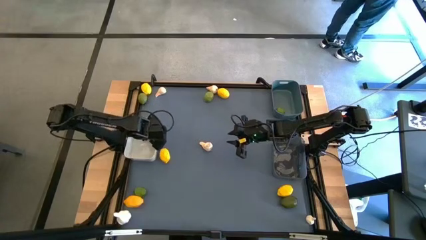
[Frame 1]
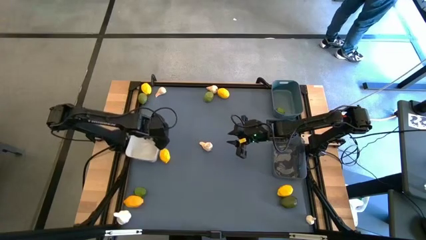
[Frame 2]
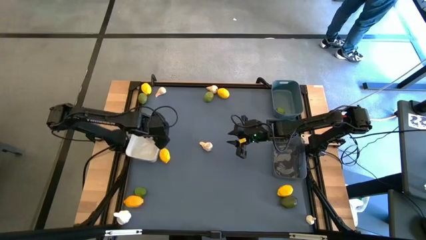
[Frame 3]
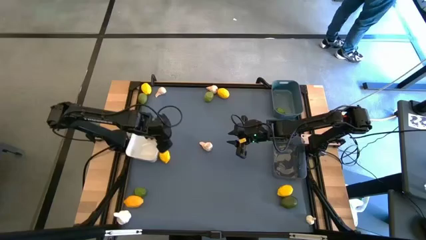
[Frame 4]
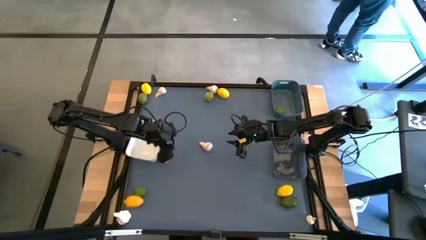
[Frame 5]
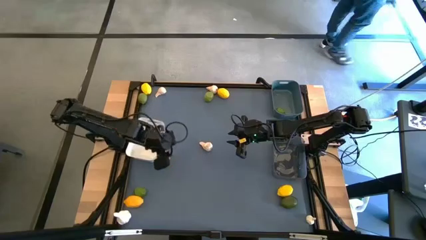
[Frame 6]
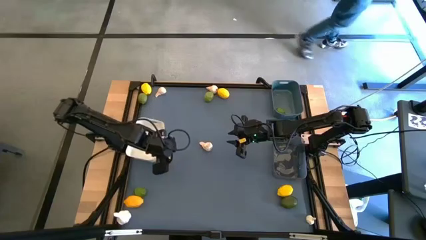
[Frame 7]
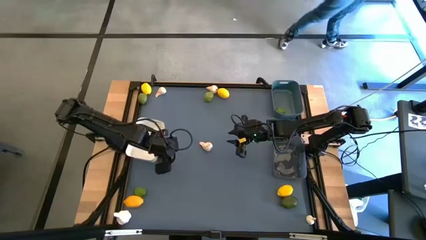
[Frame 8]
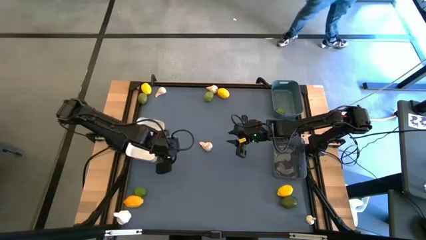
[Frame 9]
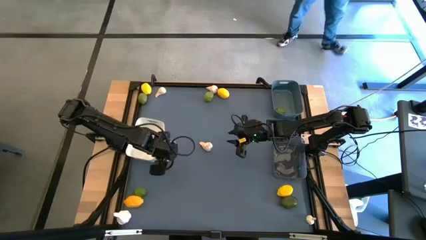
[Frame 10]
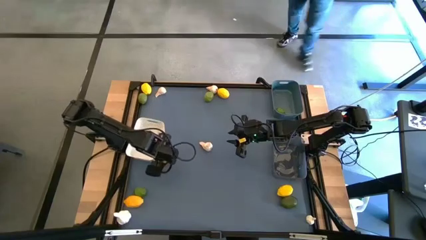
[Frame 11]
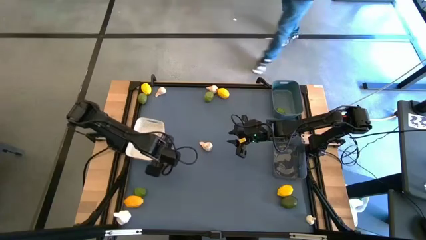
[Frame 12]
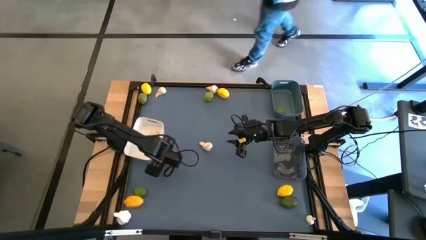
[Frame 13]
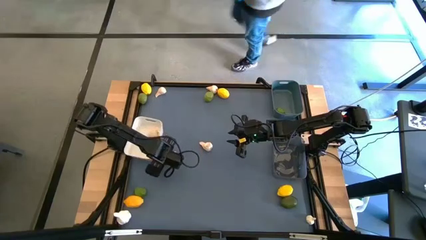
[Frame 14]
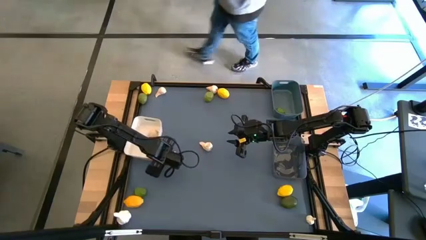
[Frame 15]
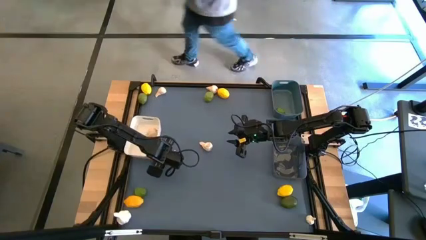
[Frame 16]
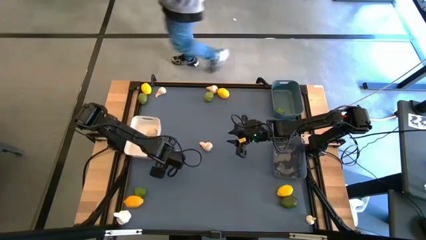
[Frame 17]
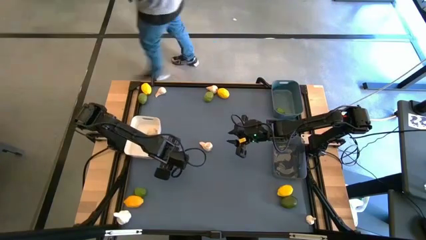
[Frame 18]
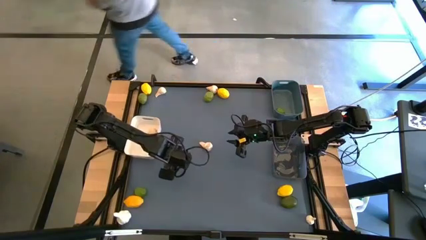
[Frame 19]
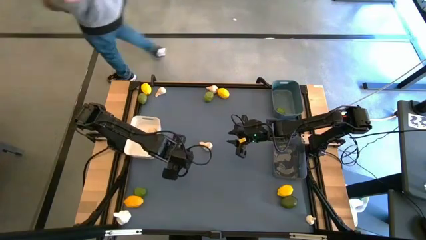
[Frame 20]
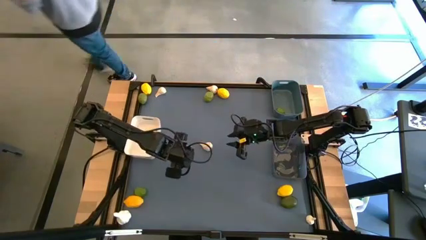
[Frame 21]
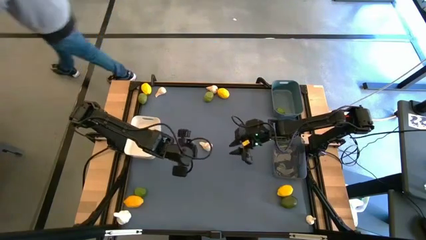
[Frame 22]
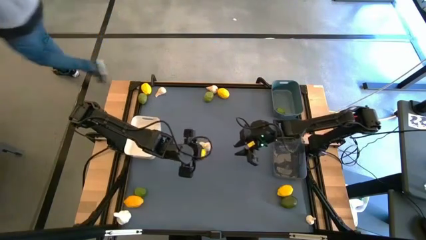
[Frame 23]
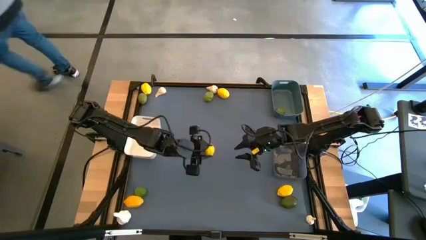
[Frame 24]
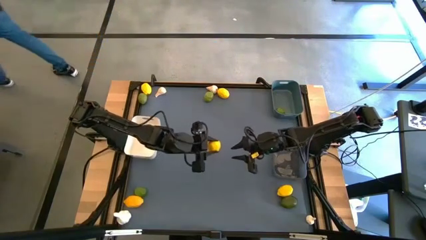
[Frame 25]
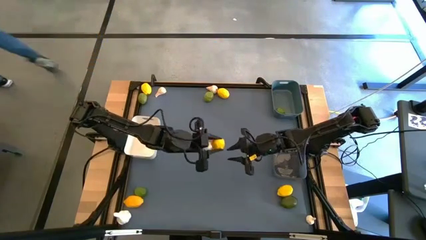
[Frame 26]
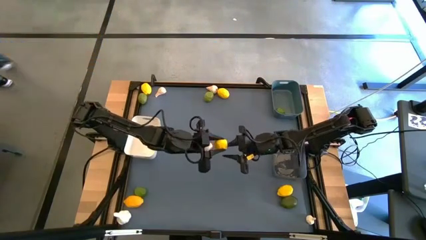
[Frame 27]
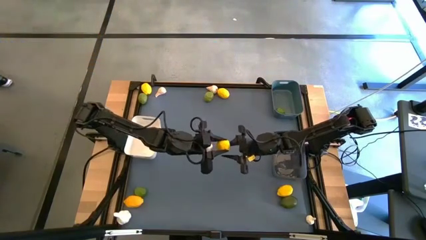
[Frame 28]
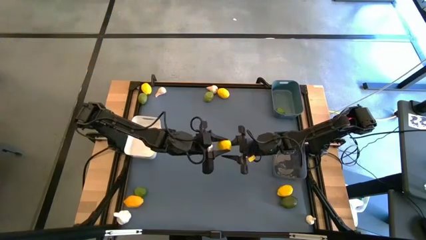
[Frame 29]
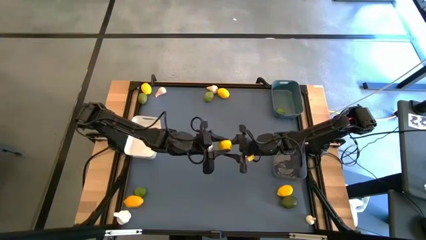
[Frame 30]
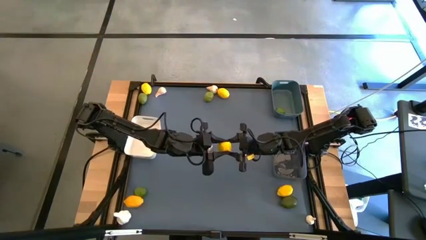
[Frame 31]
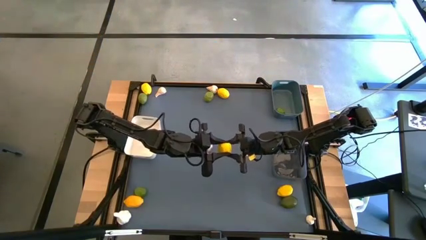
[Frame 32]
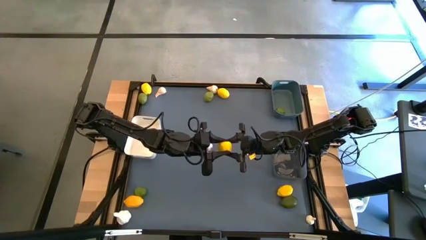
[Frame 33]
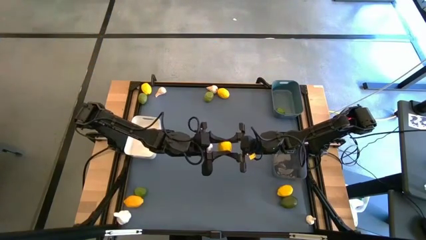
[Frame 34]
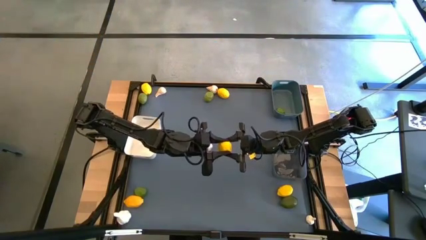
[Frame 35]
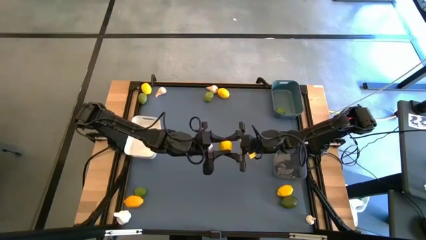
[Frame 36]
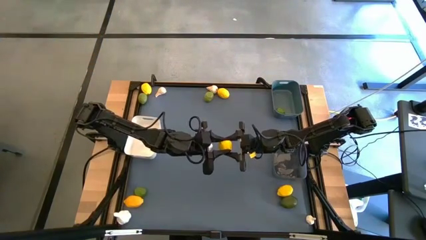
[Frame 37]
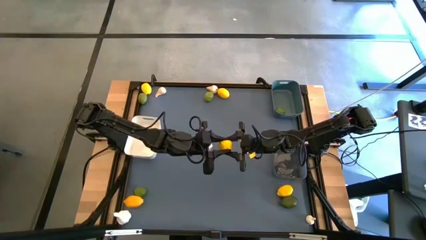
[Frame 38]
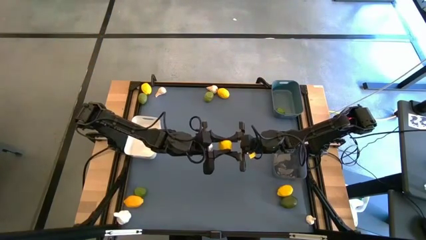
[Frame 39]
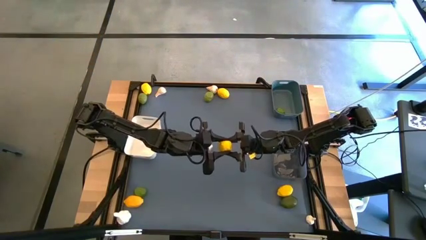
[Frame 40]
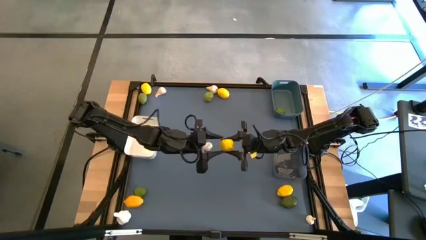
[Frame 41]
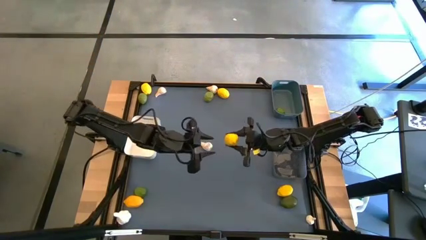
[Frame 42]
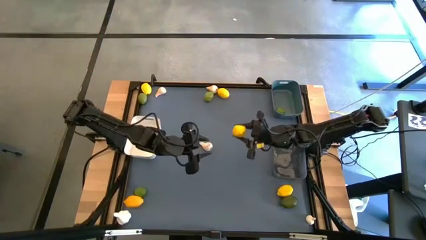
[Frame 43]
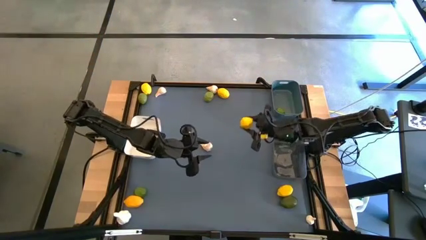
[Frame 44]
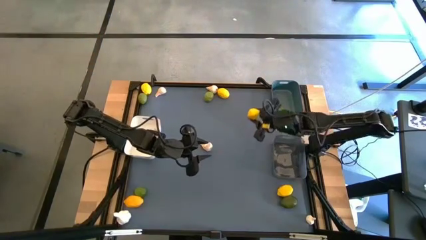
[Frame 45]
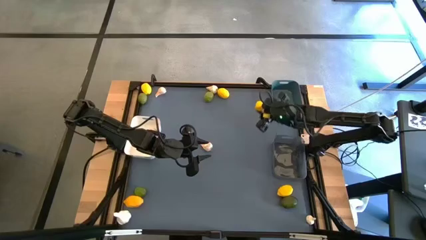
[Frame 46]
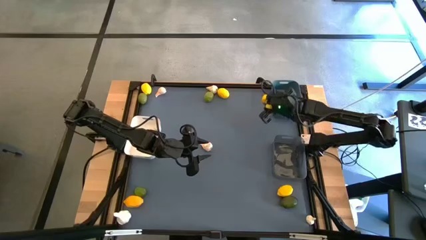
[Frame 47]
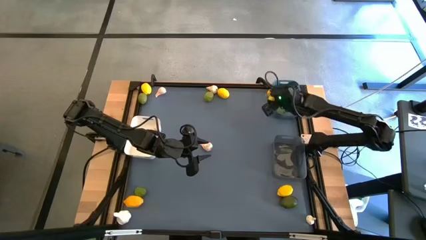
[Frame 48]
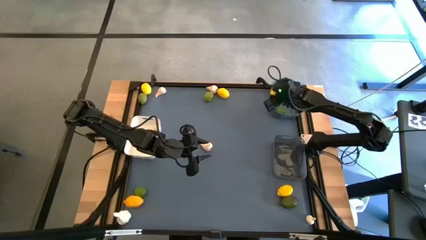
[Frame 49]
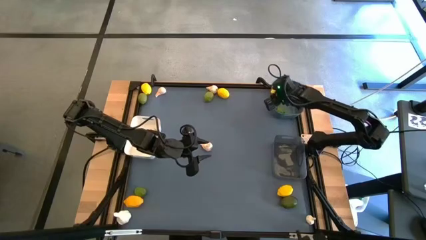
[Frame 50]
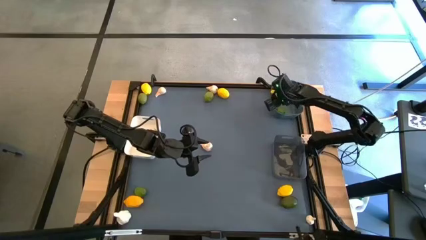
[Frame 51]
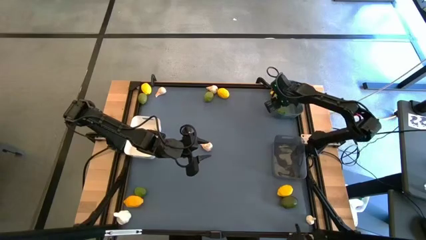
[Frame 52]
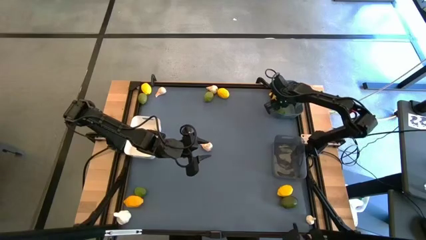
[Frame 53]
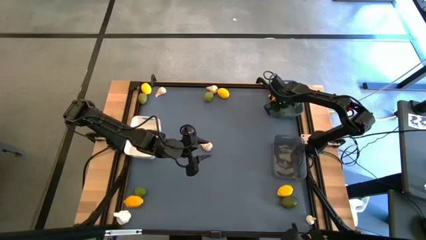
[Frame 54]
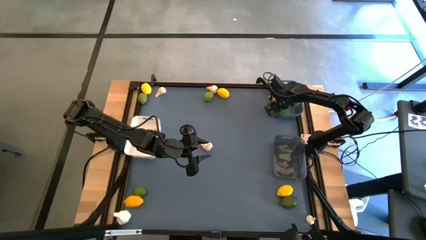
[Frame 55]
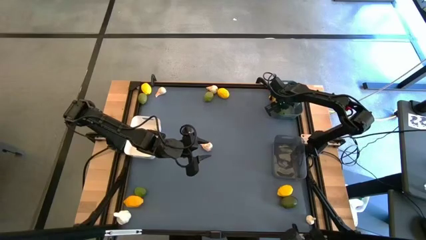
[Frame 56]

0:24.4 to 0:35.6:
Task: Sort produce into baskets
Put the lemon into the blue bin

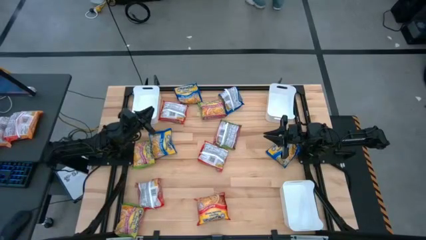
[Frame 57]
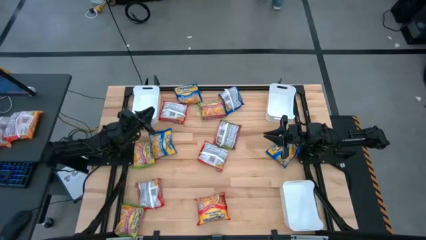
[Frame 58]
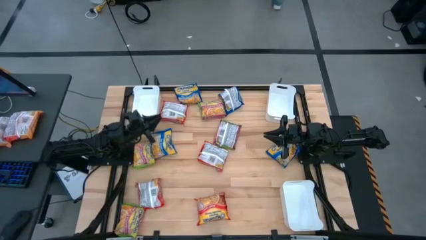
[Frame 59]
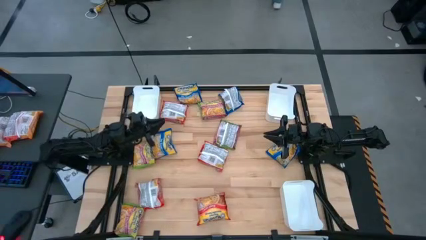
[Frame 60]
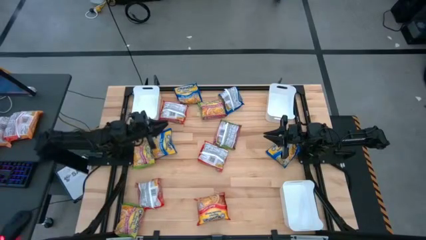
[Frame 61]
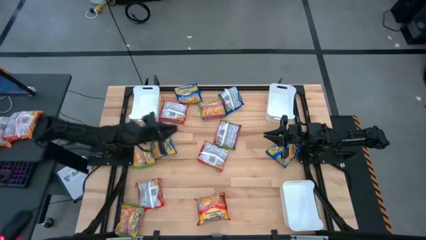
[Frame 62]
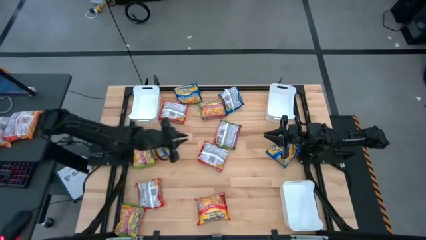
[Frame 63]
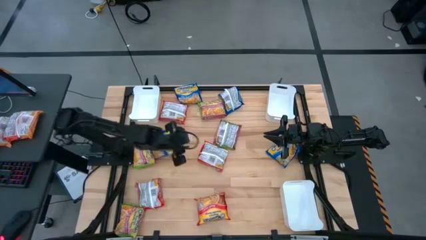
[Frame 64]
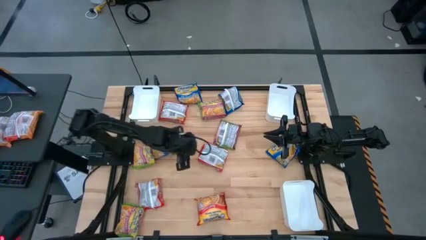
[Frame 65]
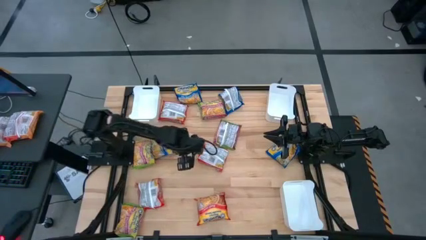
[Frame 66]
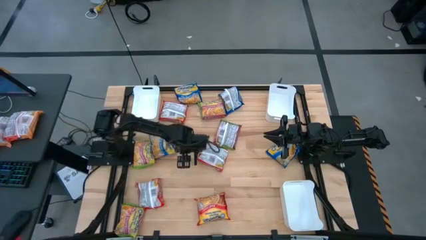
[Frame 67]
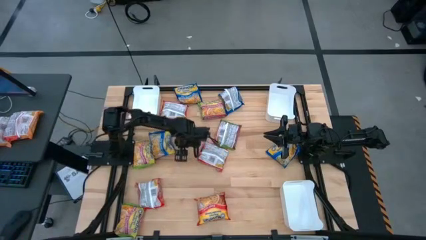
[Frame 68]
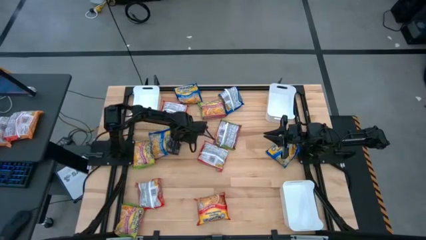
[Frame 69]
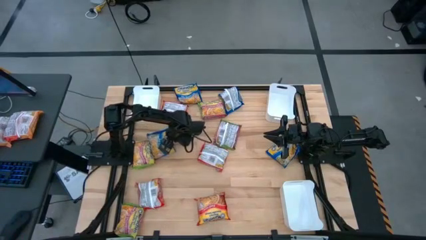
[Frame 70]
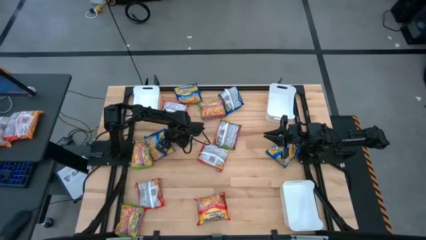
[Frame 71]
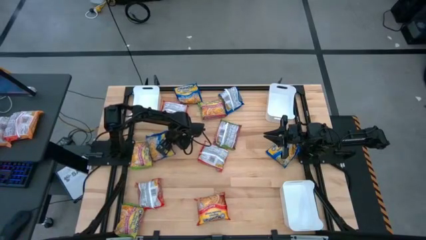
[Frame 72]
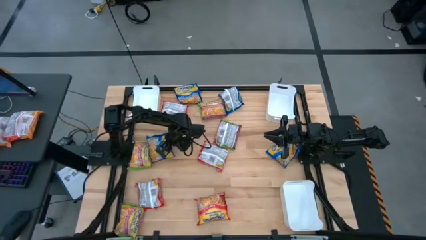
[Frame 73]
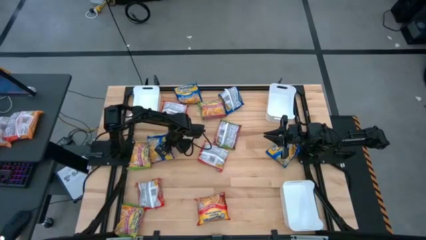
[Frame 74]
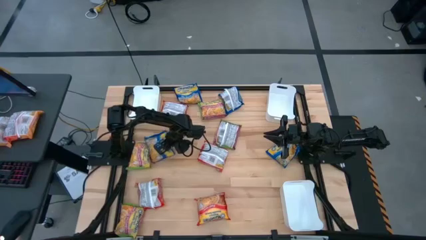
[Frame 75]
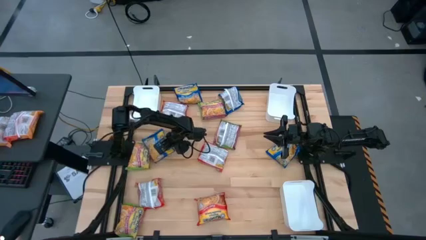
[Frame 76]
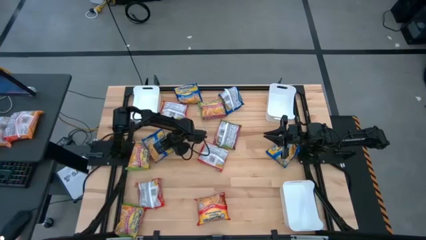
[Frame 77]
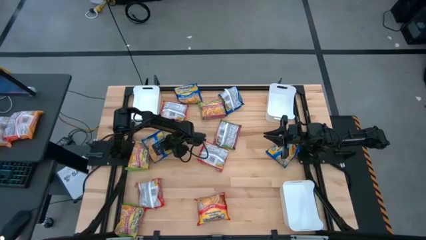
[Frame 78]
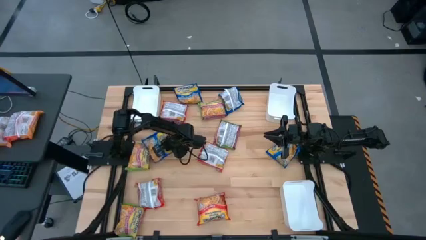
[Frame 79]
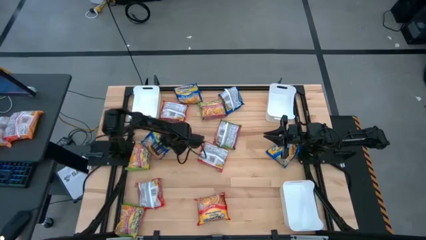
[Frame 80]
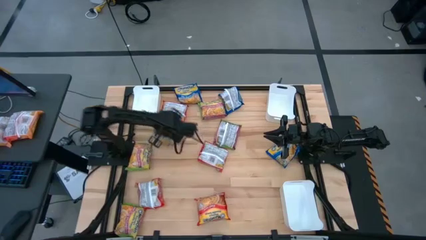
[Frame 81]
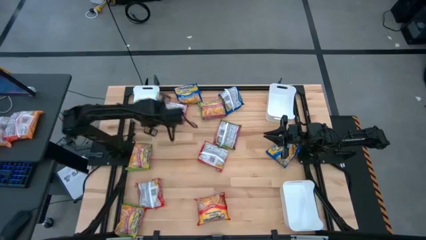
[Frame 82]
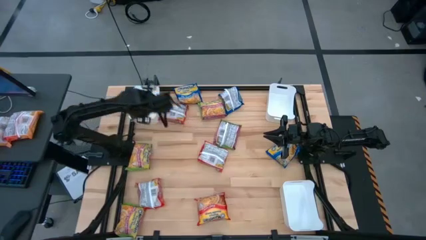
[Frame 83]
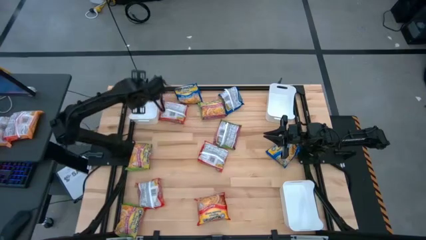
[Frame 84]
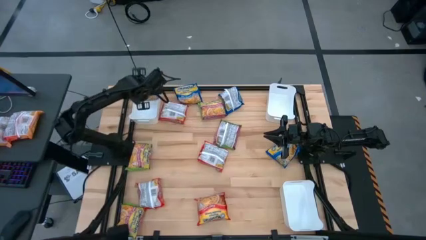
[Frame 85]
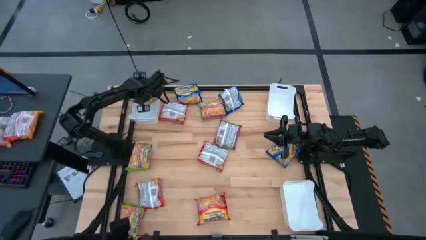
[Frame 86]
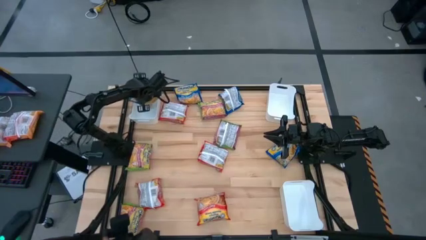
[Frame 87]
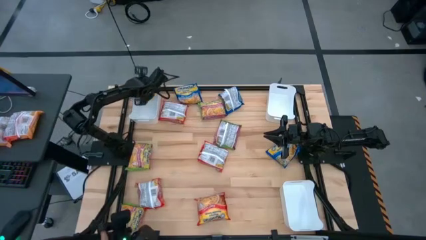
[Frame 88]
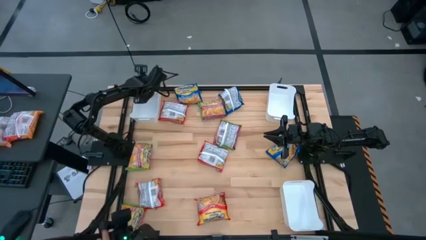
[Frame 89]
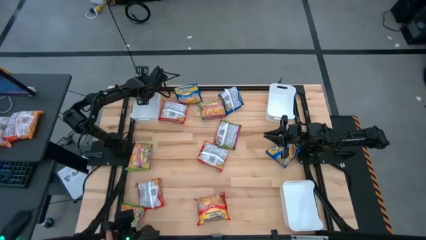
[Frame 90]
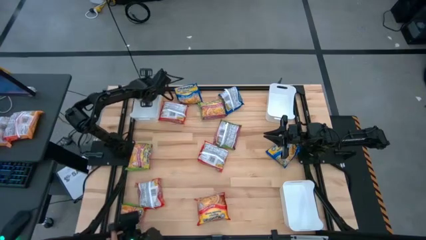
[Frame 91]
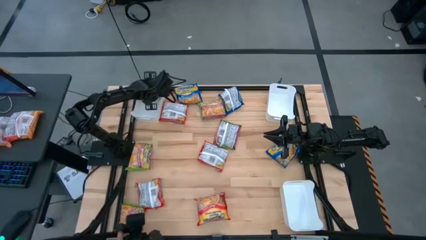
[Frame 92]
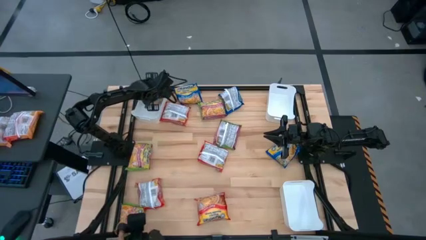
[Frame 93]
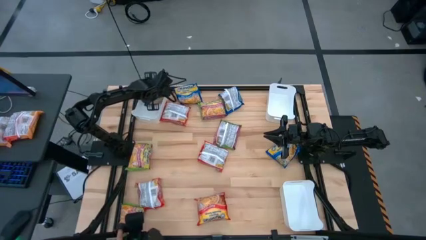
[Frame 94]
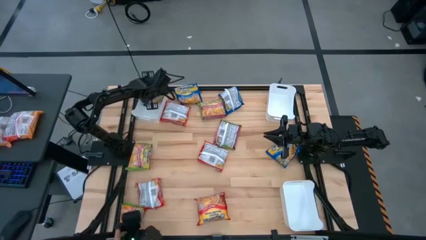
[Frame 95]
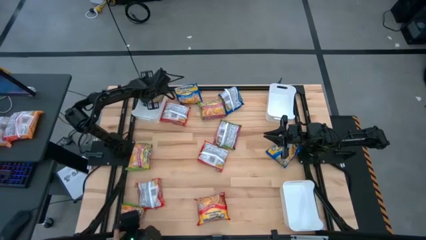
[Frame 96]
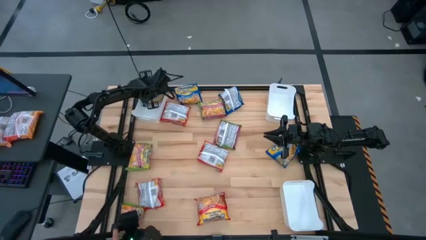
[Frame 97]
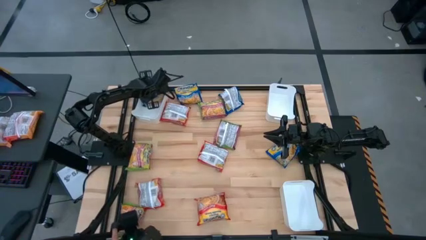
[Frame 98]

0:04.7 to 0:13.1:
Task: Sort Maruchan noodles
Put the blue noodle pack into the top left white bin
